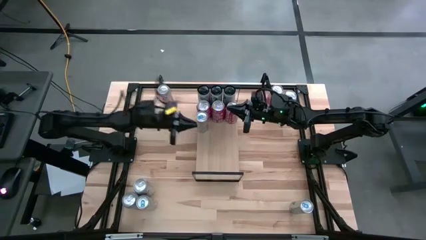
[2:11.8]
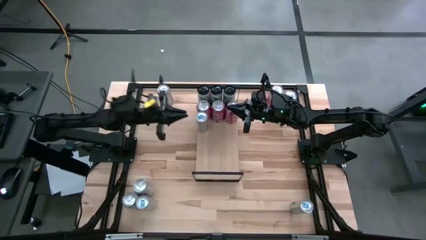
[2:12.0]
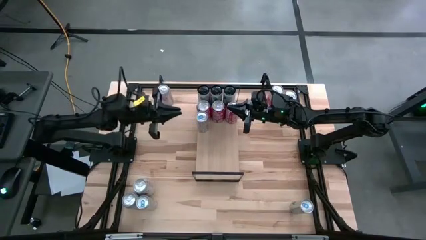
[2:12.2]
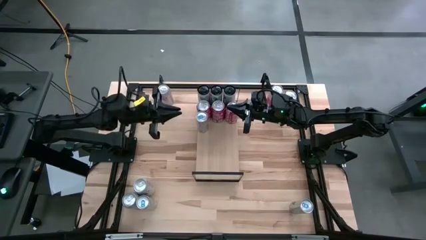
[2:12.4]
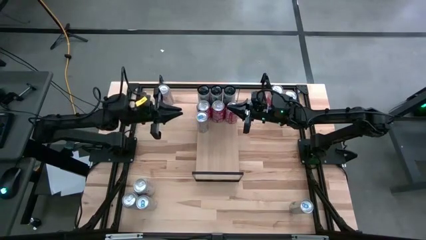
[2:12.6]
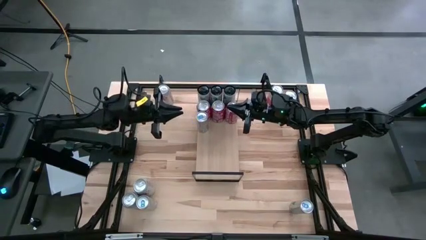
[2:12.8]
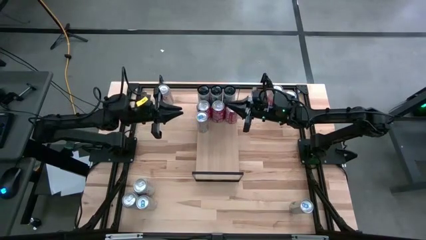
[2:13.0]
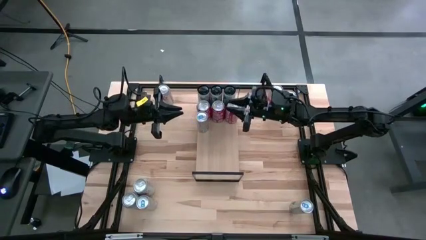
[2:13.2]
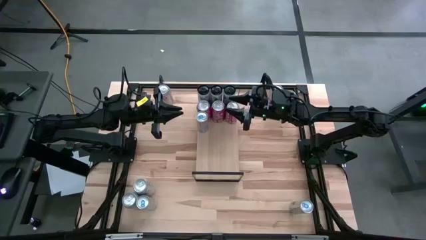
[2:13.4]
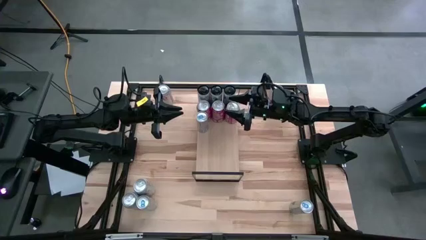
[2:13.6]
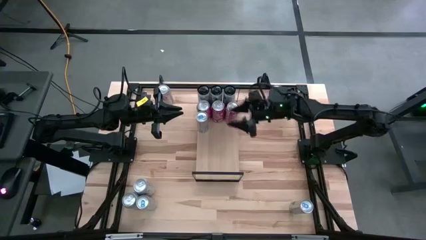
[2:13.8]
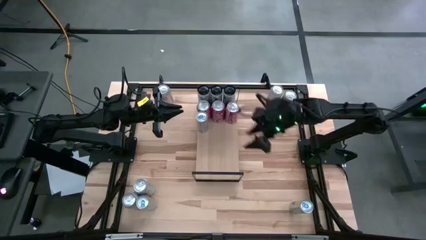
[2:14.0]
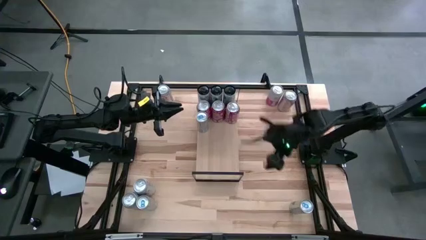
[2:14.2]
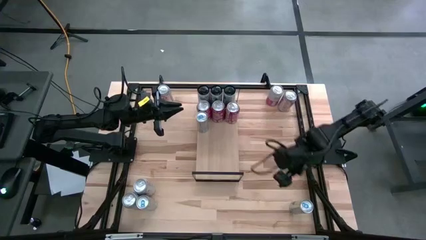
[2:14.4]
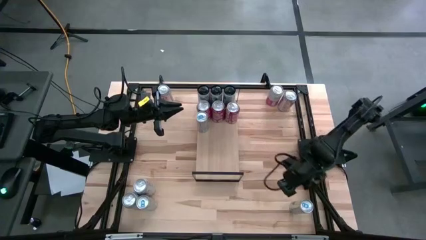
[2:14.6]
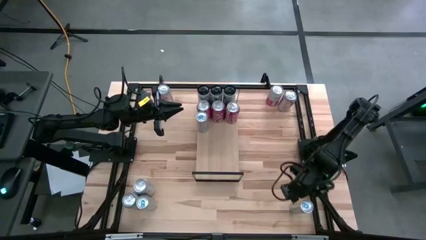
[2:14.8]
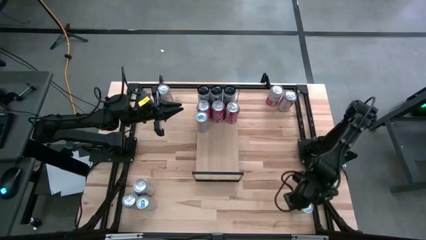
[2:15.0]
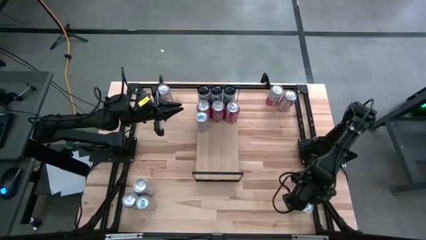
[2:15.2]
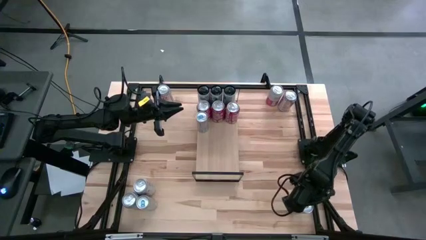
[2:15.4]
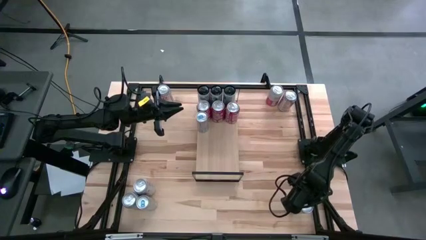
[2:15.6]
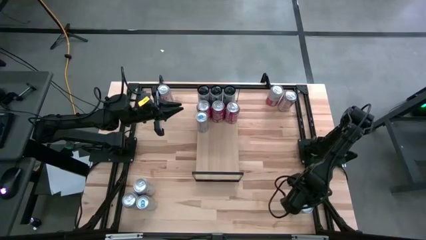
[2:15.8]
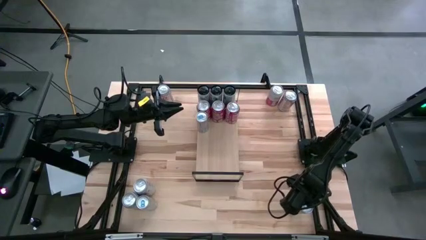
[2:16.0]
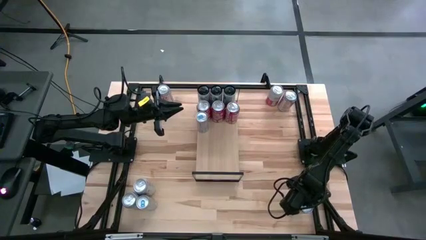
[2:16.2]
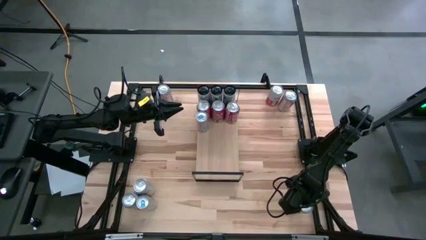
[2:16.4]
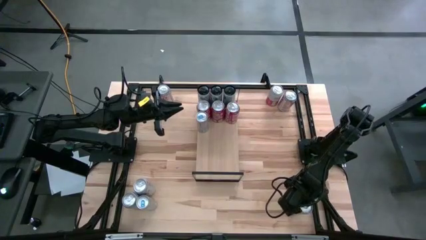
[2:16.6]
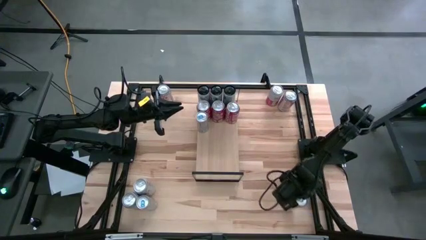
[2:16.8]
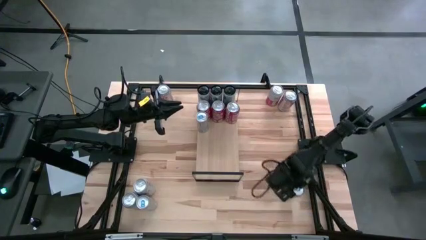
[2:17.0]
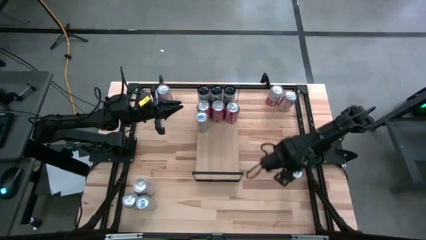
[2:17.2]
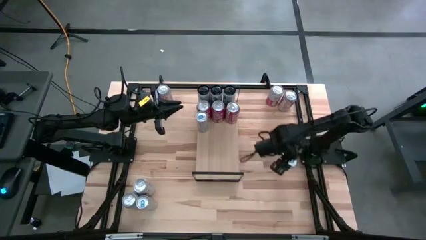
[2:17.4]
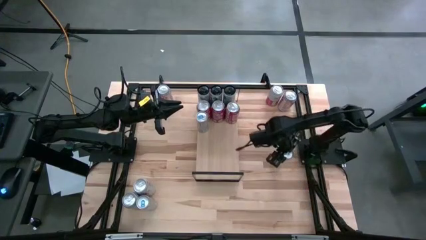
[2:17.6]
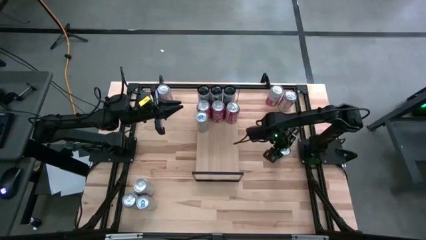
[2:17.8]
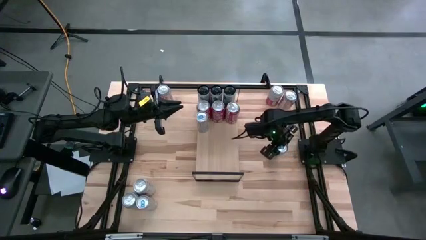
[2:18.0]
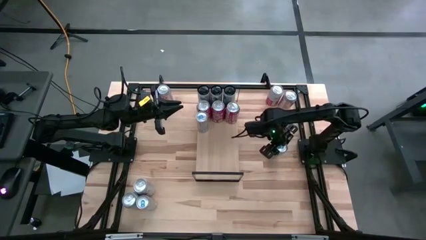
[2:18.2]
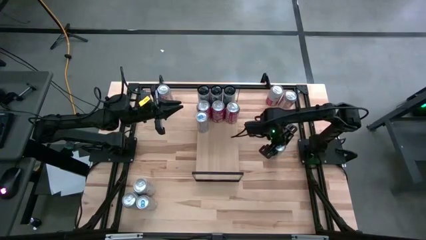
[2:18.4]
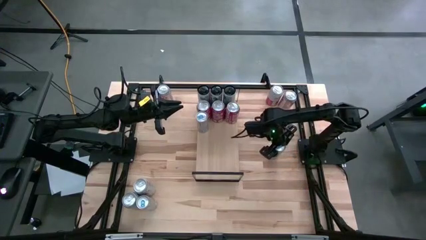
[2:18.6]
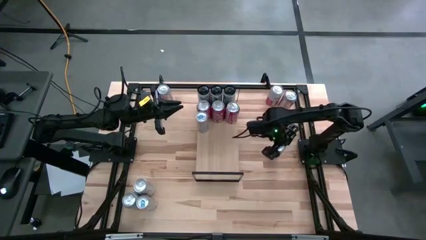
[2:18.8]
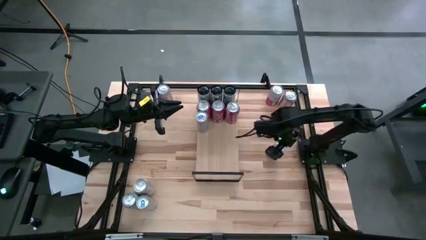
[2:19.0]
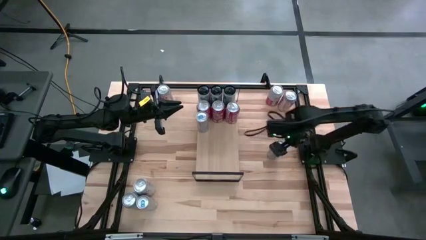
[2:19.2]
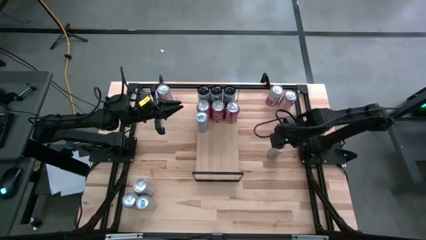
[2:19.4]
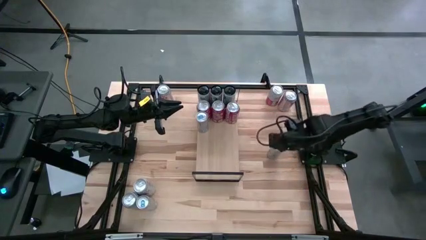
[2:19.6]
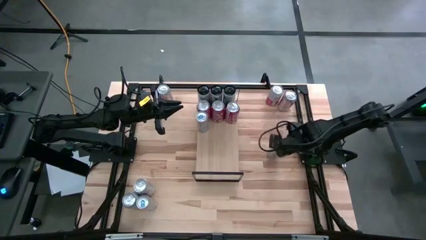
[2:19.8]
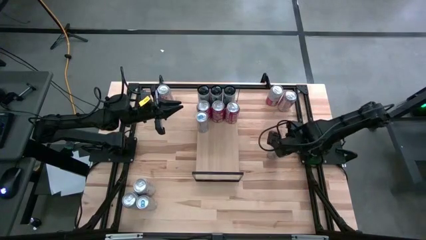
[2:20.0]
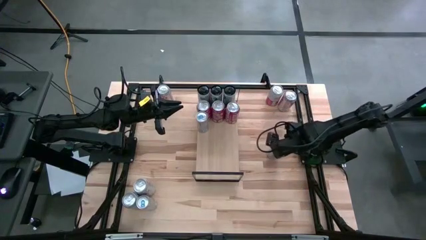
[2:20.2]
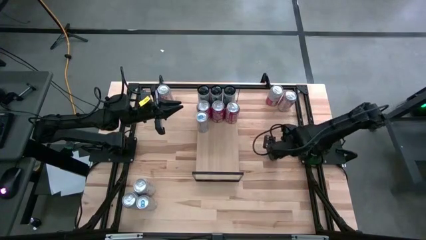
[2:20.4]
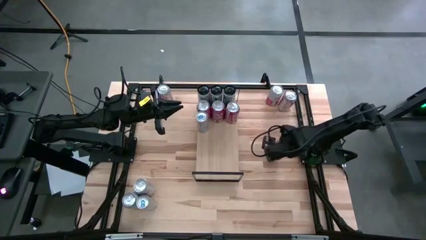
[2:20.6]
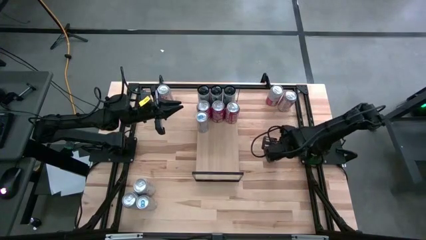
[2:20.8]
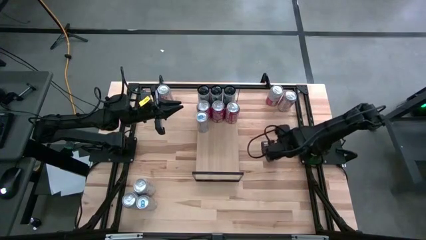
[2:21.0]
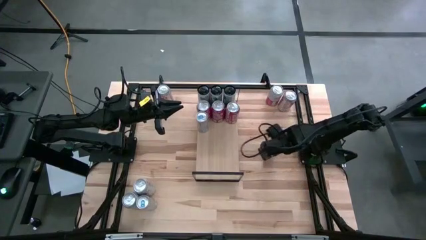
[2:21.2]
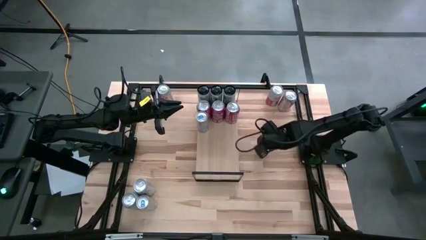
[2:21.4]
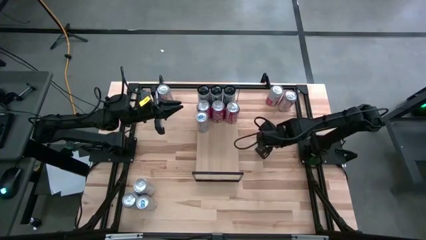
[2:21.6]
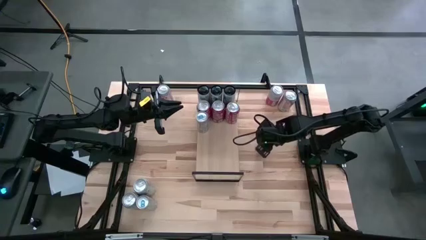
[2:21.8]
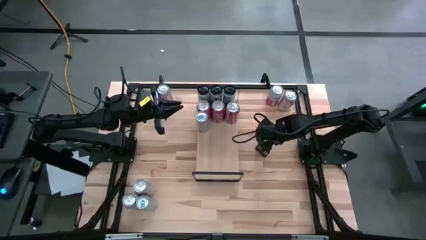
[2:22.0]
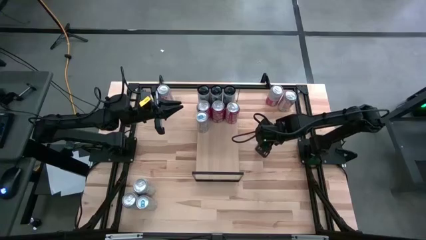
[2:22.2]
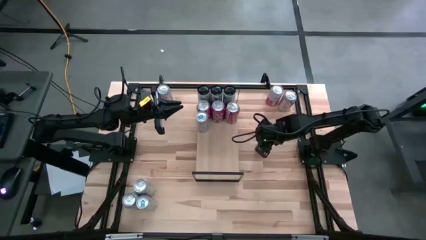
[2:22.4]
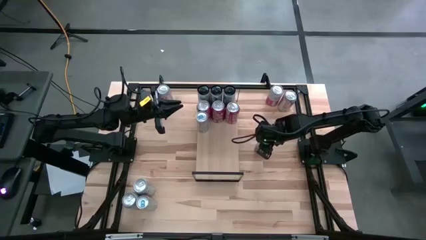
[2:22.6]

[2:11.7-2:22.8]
Task: Place canned beverage on shelf
Put the right blue soda can on the shelf aligned with the other blue soda can

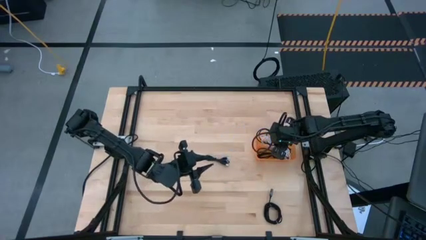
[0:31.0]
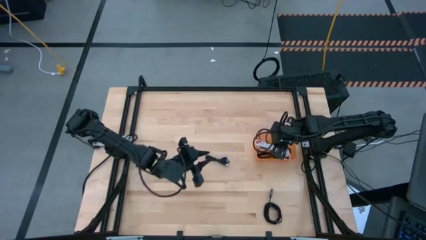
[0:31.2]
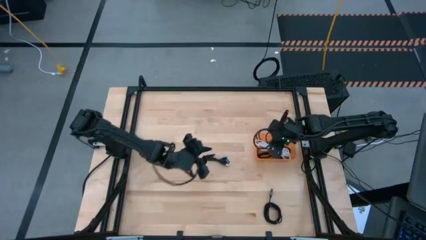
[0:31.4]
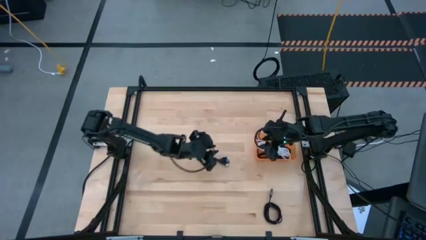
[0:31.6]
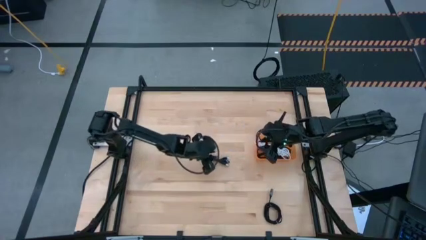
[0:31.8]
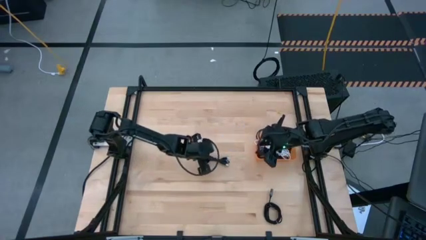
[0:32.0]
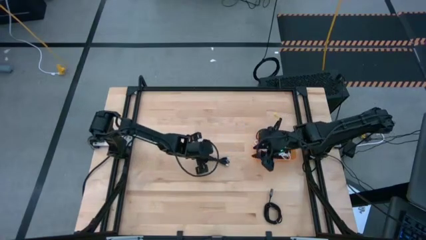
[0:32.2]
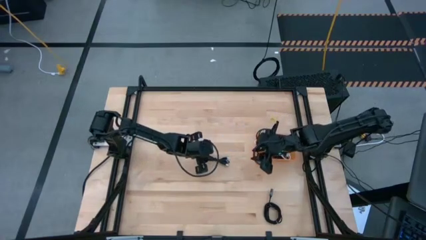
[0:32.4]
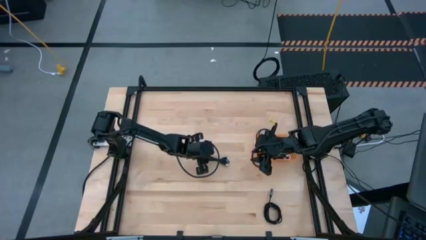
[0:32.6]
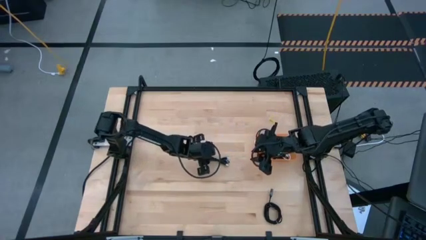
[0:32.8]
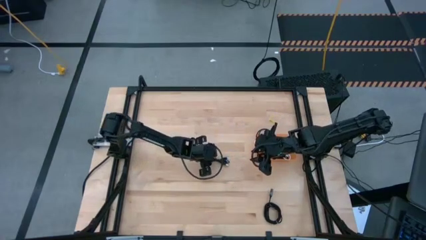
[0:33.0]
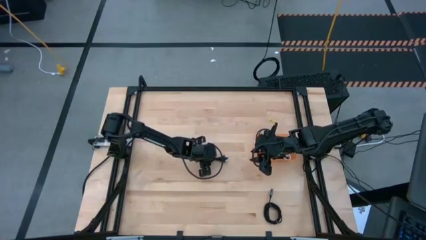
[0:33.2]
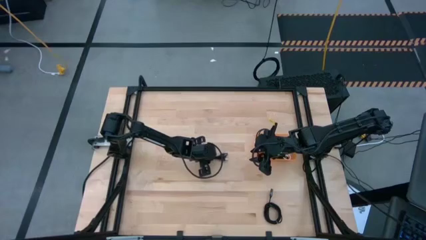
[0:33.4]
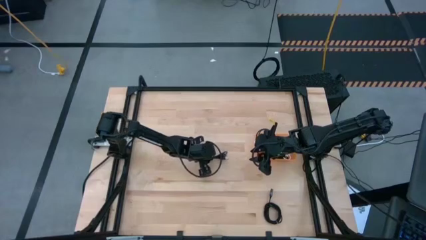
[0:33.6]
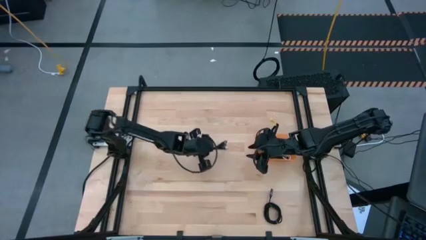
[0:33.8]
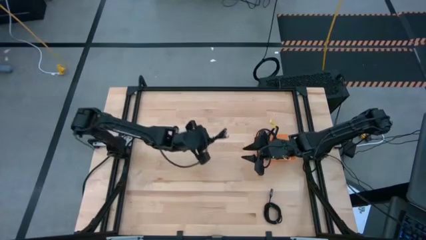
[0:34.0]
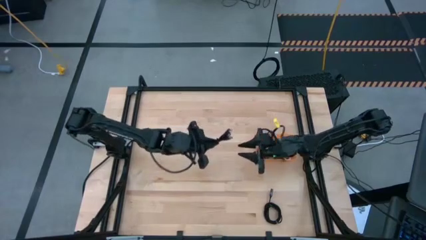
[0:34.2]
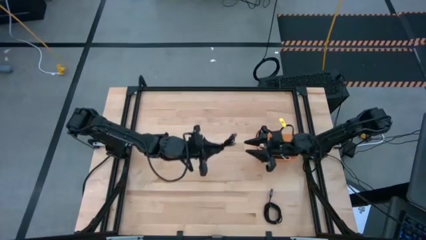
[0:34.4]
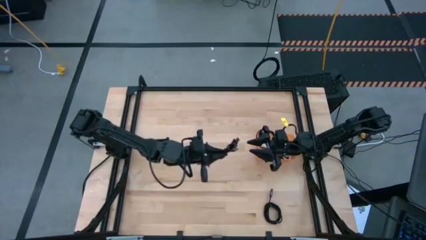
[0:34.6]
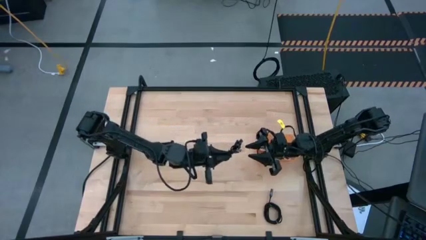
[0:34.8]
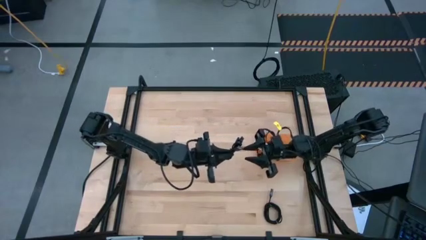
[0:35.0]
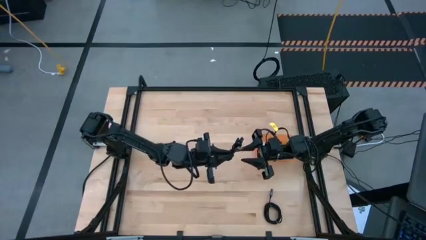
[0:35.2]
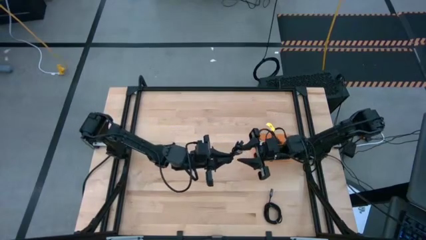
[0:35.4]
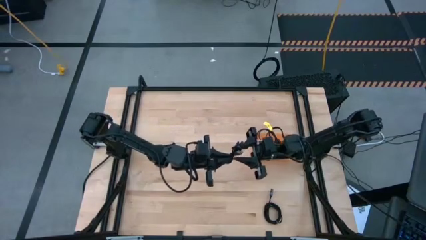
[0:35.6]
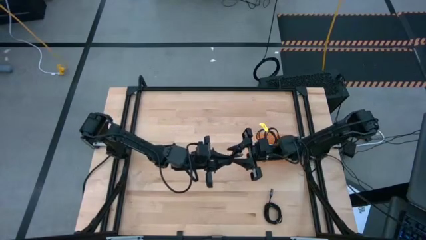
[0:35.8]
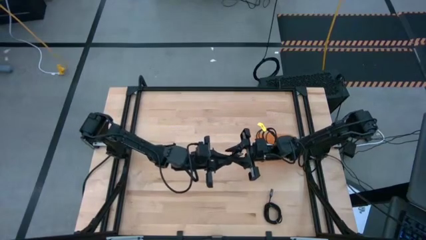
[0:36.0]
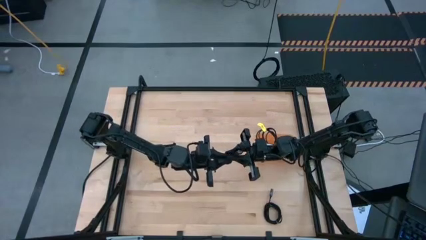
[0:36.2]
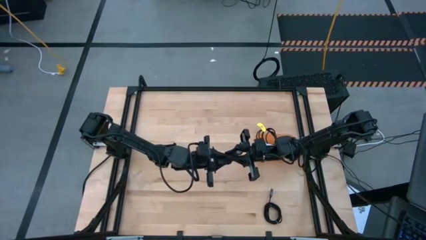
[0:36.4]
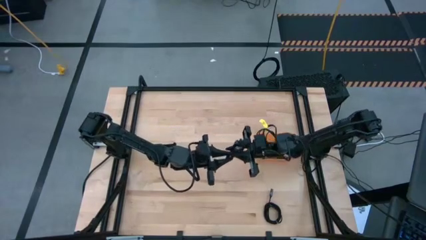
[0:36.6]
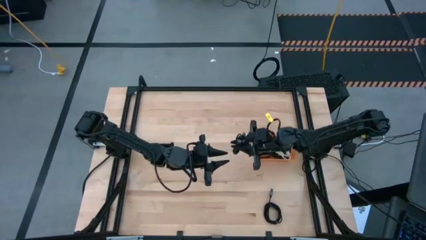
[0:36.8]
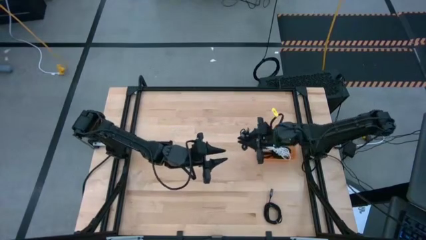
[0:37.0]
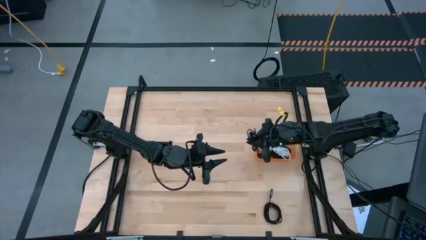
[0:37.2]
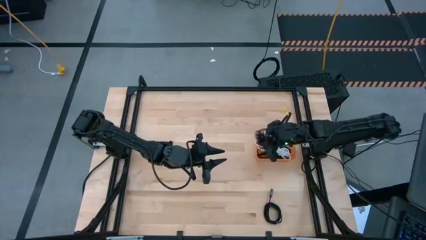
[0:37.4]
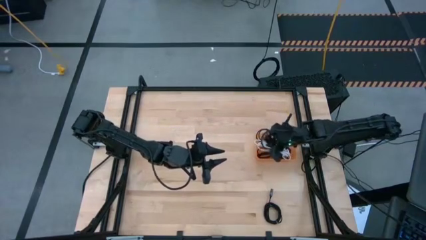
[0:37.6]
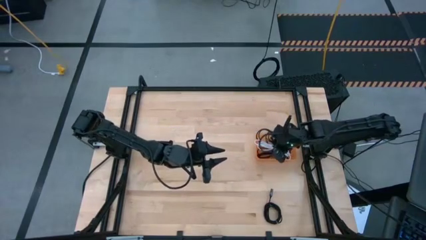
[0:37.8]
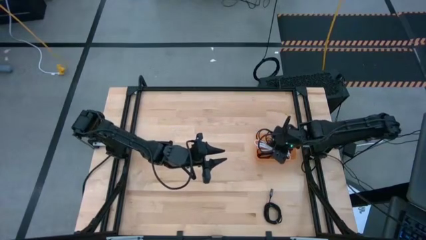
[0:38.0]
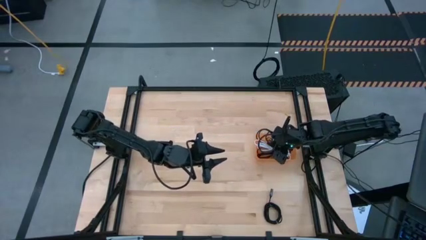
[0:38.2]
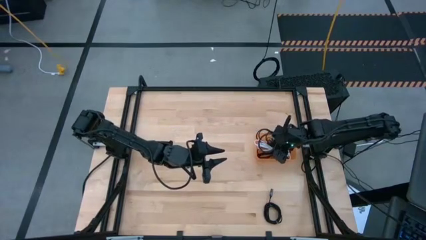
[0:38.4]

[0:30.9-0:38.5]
Task: Pick and place USB-C Cables
Put the black charger cable into the bin
